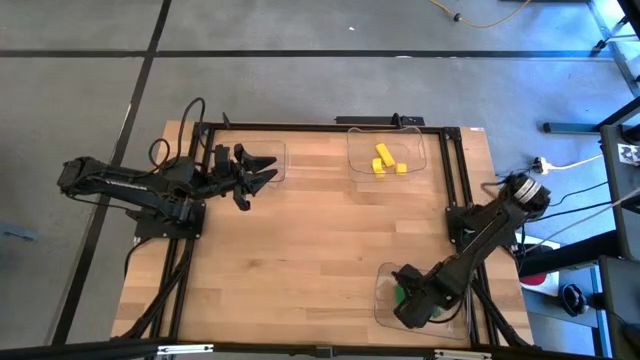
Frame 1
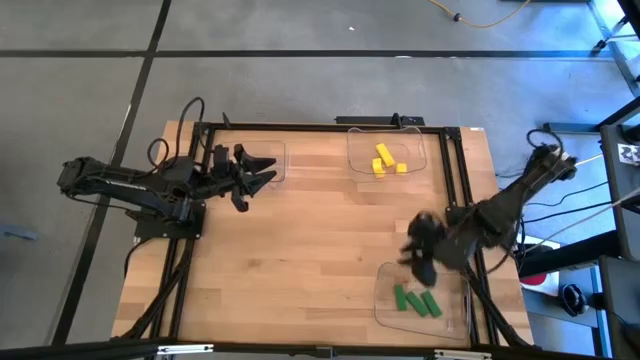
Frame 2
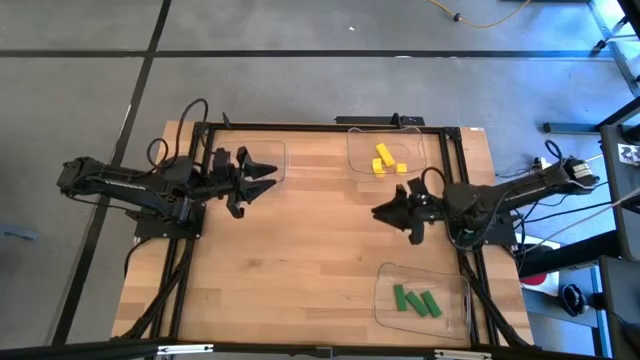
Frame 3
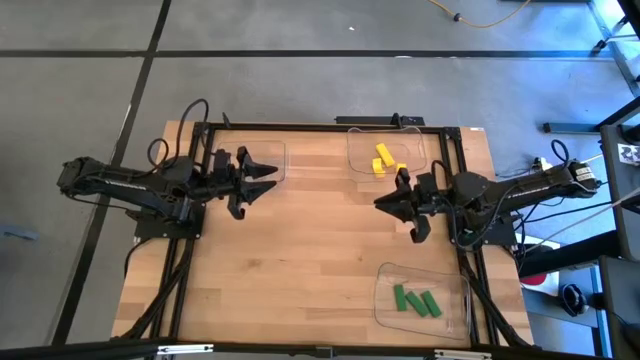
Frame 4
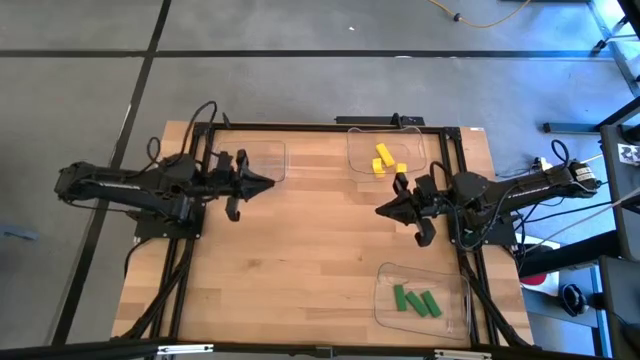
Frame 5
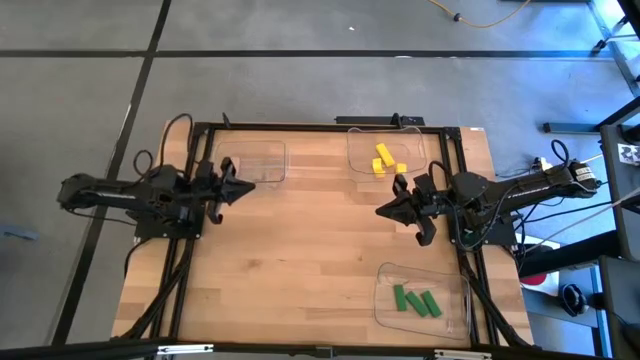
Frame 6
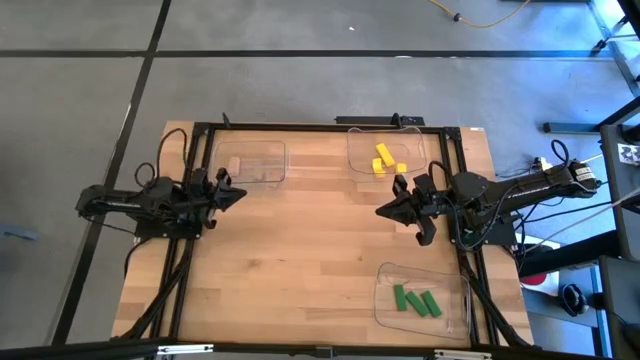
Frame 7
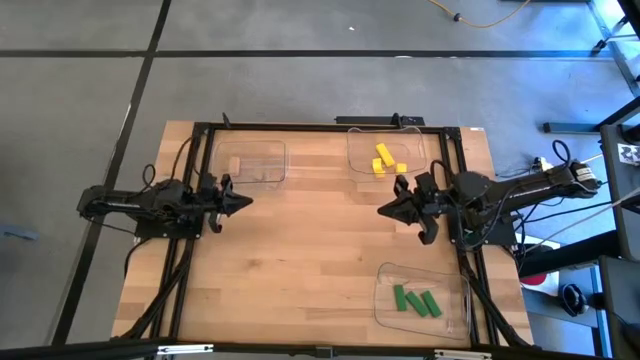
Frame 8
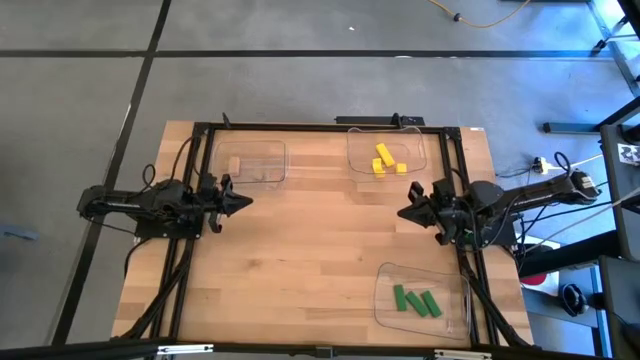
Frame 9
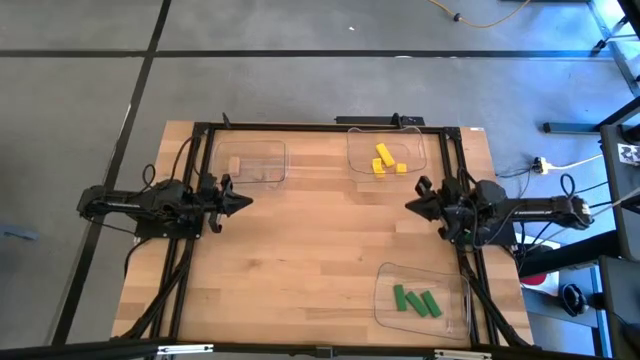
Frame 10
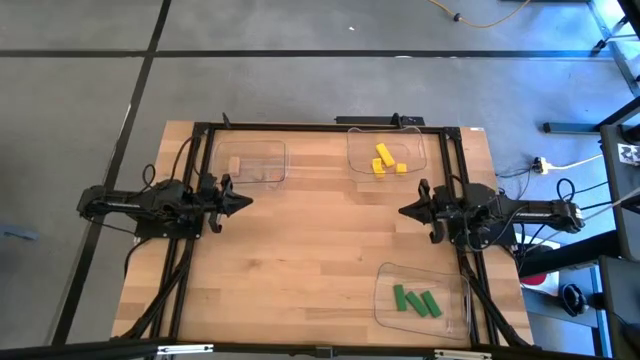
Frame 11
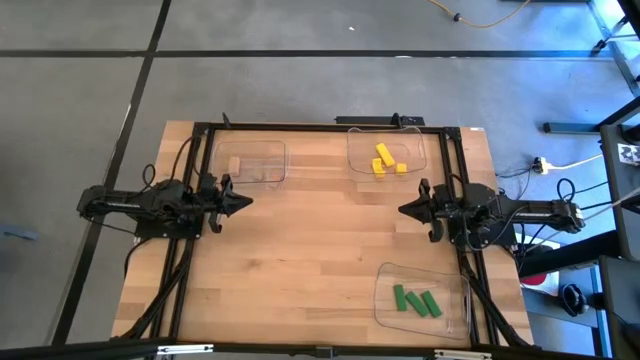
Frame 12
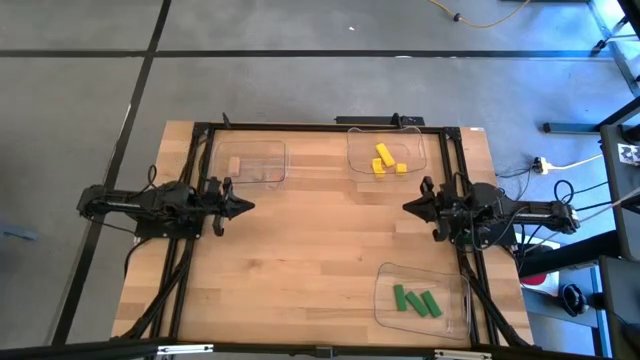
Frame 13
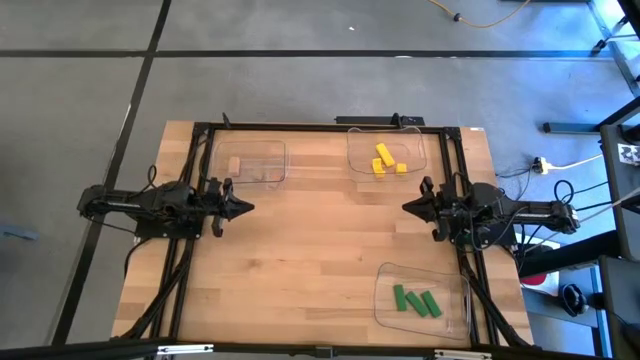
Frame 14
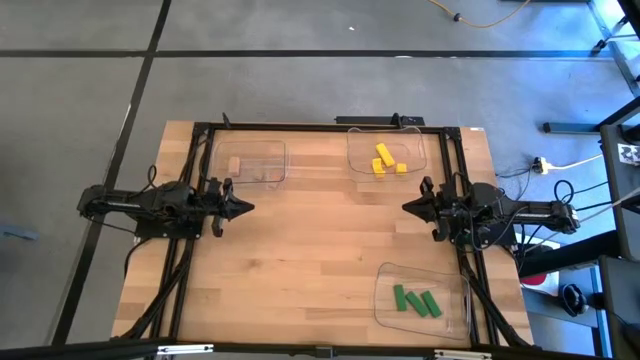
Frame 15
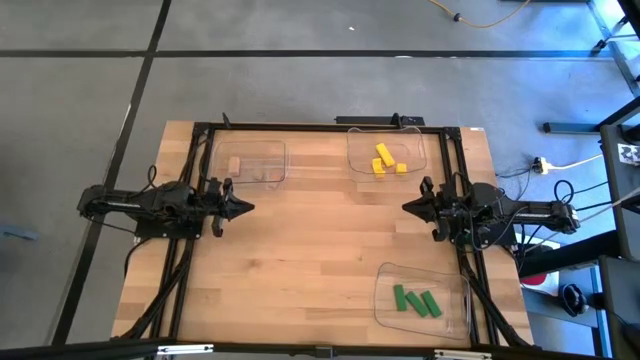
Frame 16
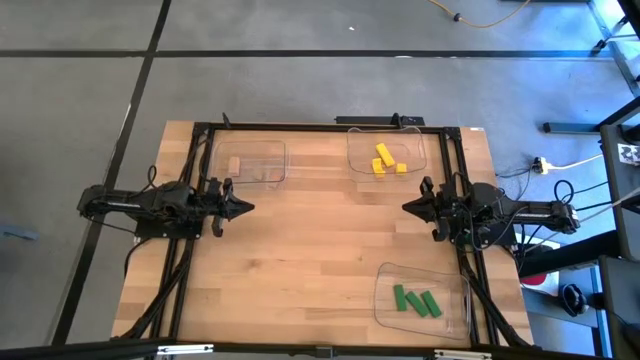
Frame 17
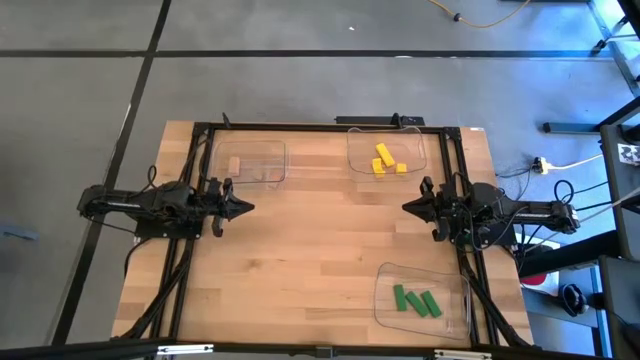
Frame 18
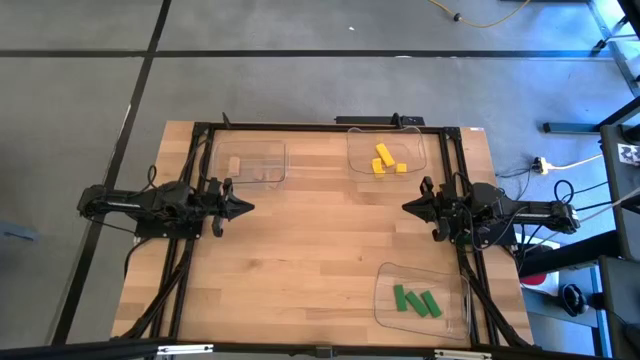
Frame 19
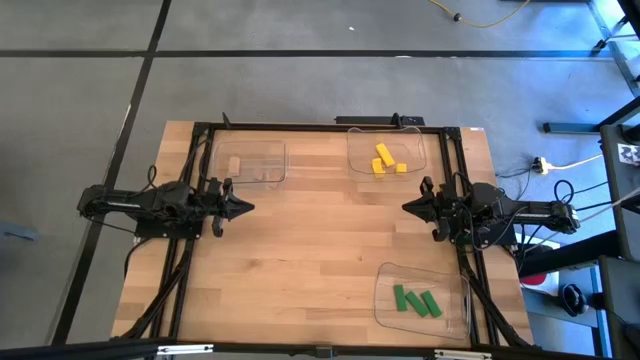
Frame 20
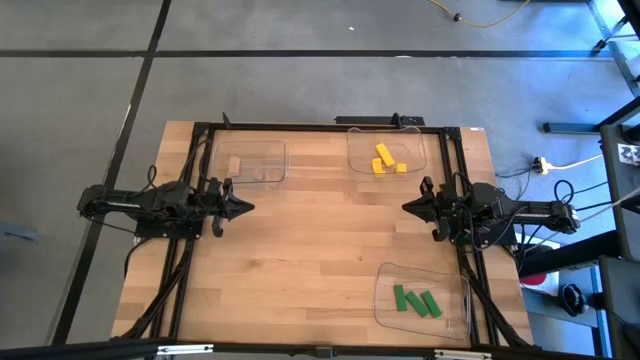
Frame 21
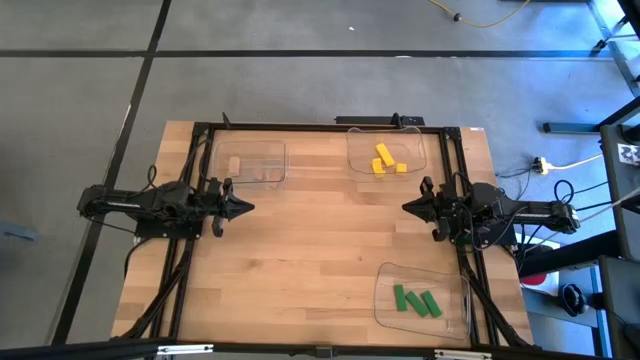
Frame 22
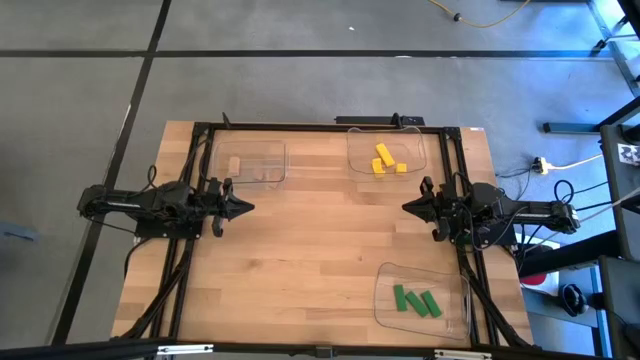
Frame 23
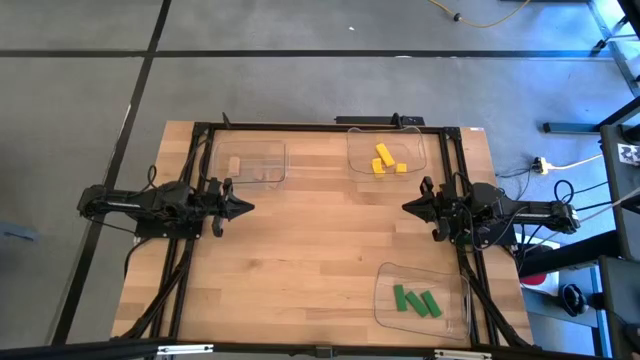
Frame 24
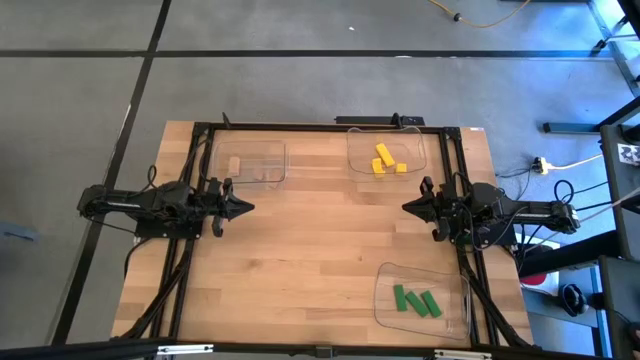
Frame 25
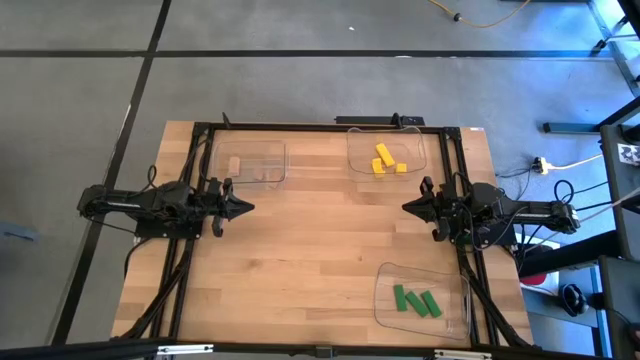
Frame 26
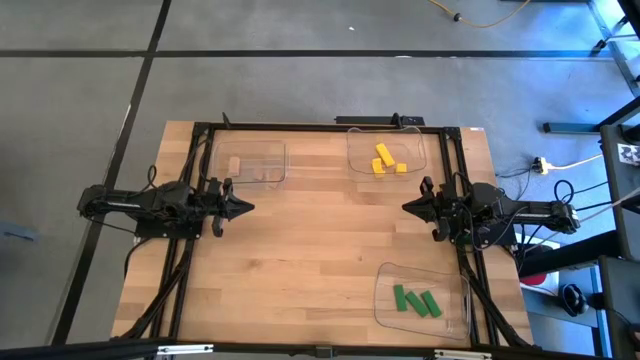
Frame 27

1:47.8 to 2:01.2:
Task: Sort & place blocks by color
Return to Home Position

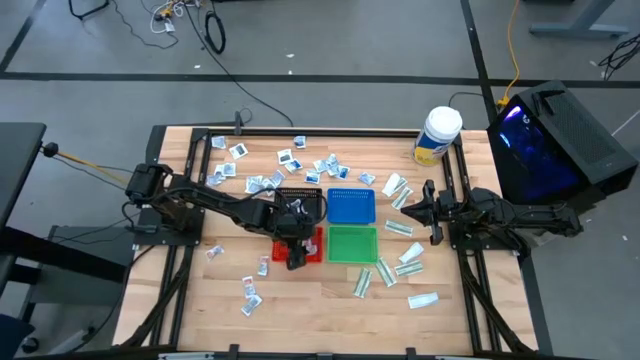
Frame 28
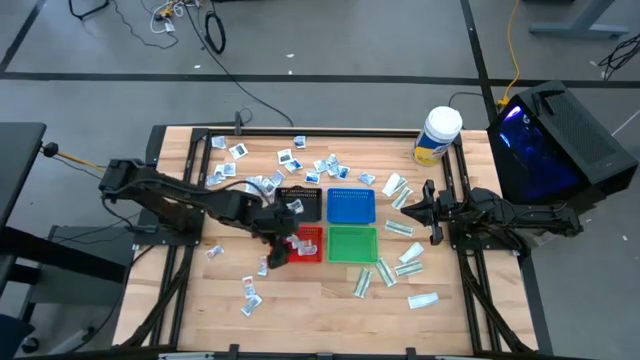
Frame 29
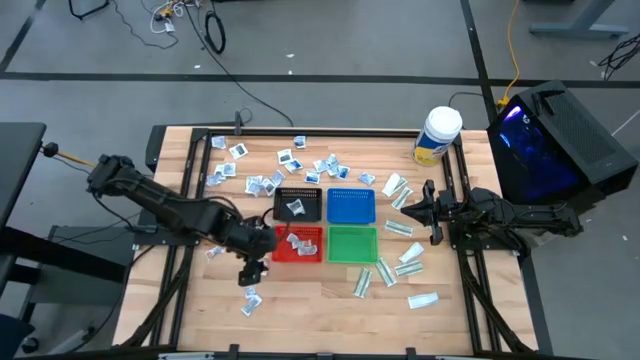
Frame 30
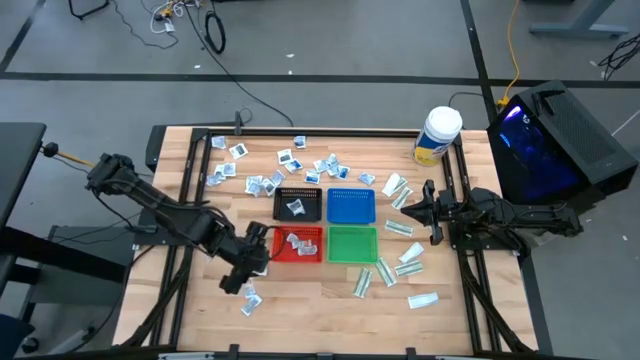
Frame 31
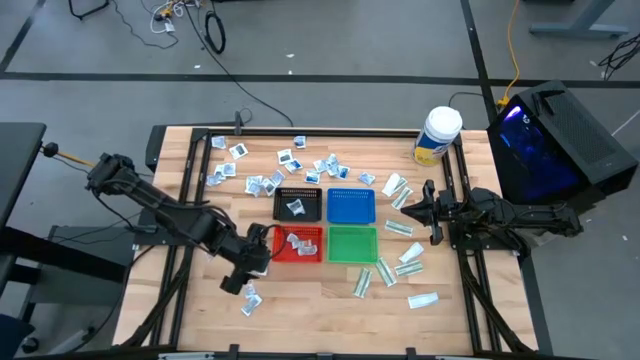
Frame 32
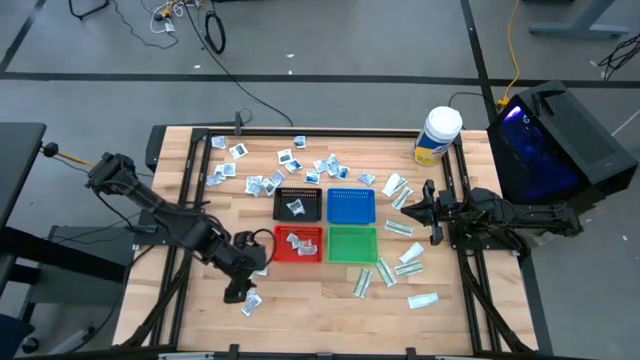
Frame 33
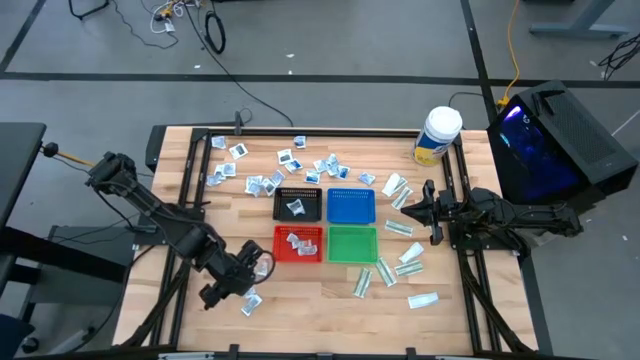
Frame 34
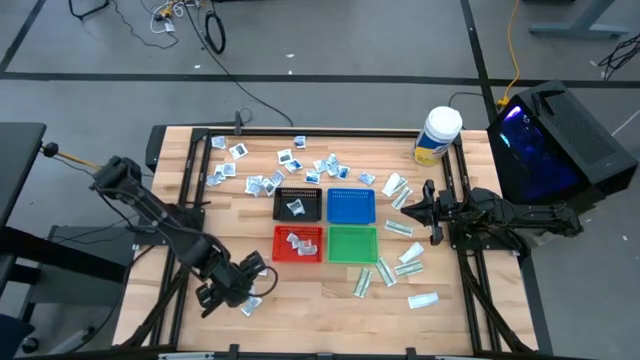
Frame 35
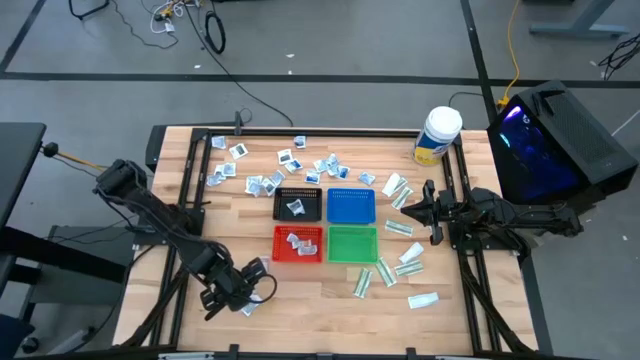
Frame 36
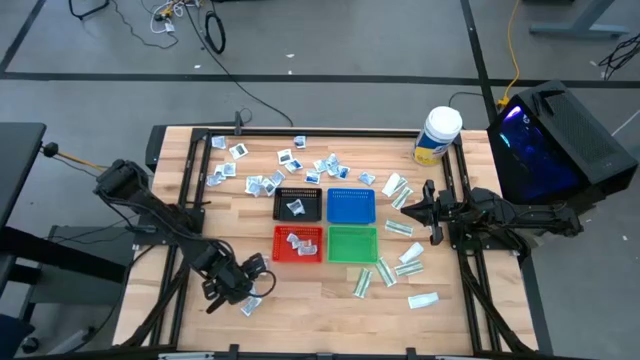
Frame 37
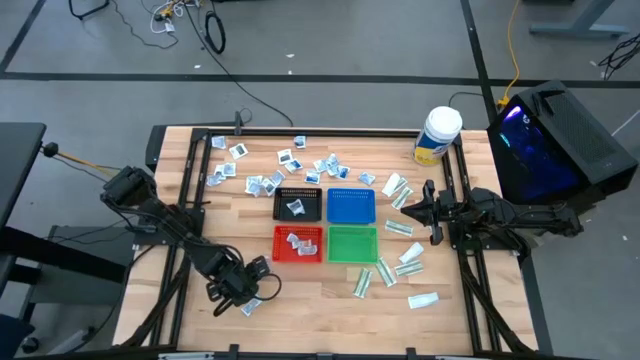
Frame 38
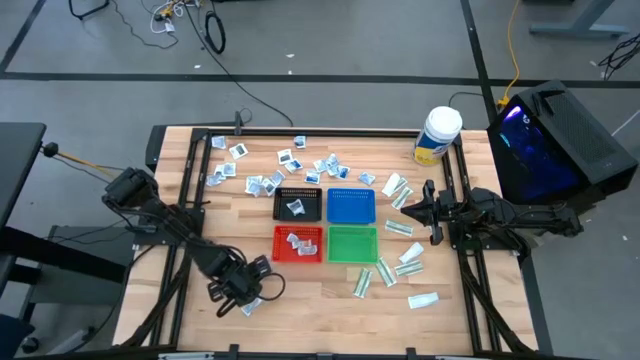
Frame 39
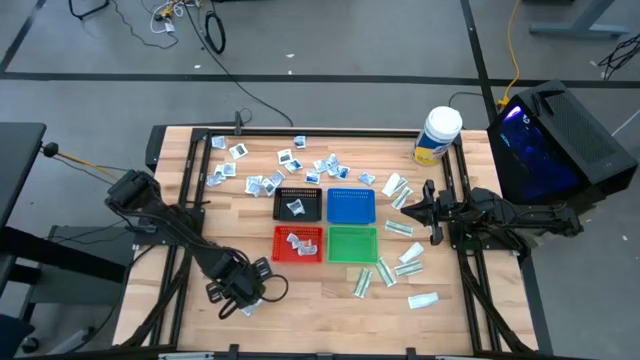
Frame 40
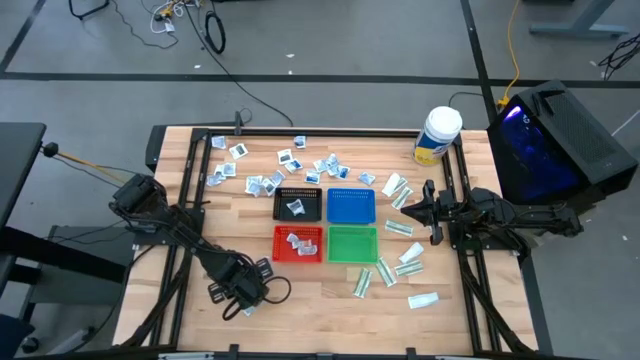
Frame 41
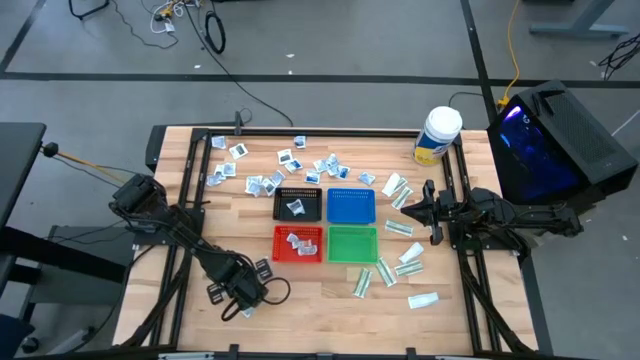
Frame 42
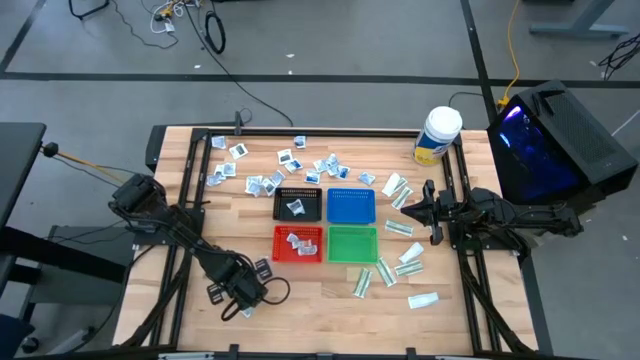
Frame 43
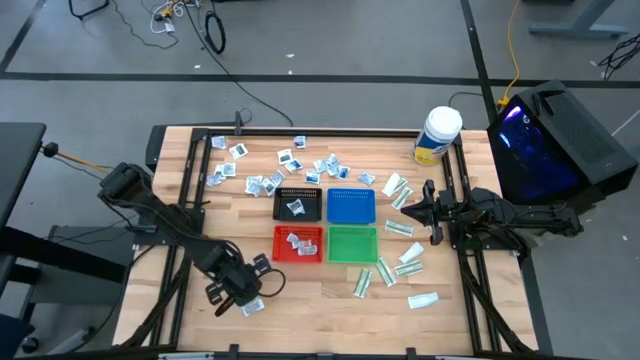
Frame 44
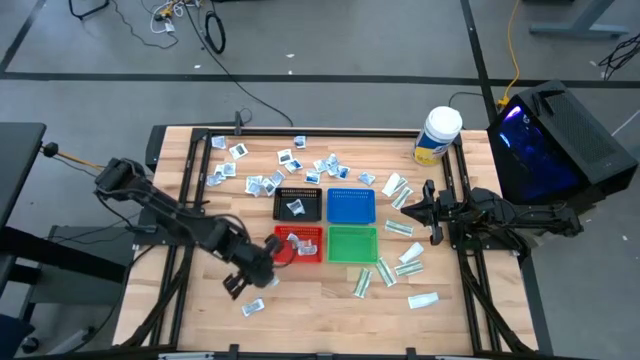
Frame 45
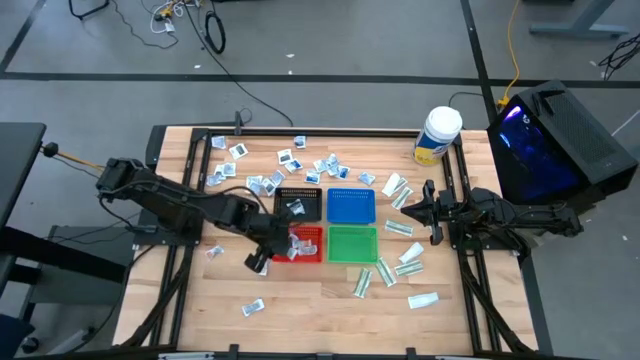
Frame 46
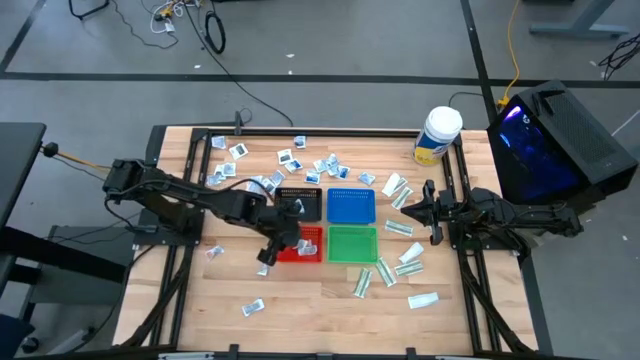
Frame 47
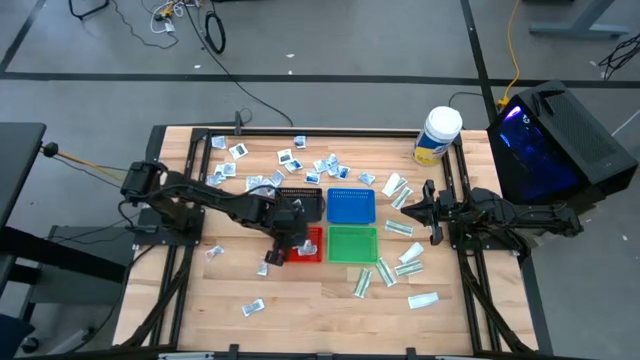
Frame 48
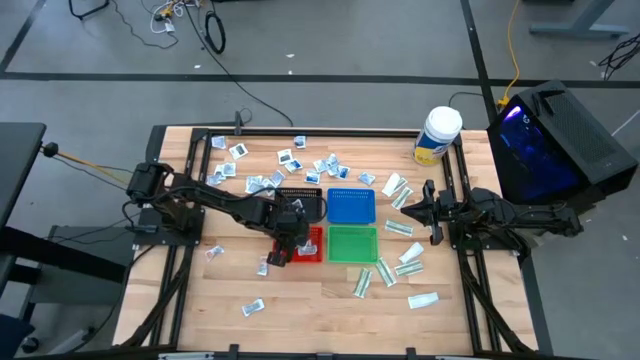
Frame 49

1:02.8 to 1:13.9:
Task: Pick & Place First Aid Supplies
Put the orange ointment pack into the orange bin
